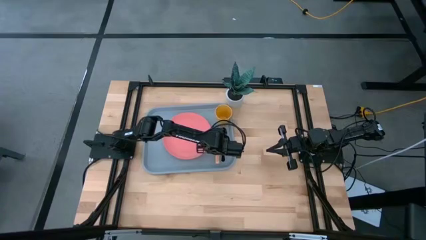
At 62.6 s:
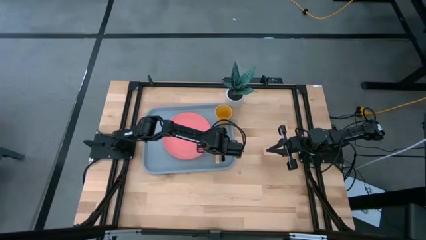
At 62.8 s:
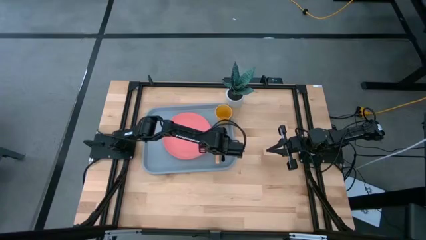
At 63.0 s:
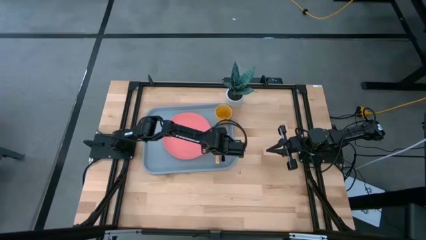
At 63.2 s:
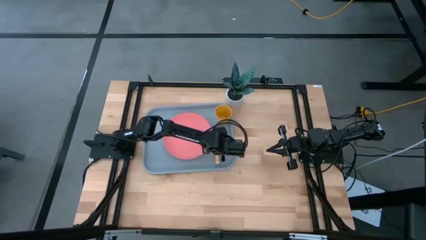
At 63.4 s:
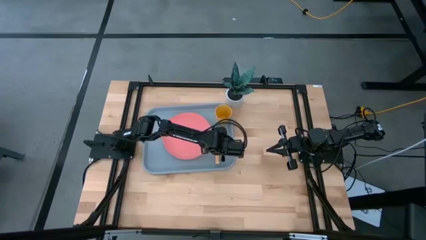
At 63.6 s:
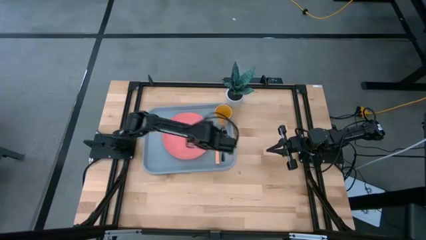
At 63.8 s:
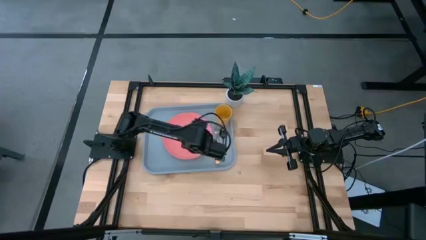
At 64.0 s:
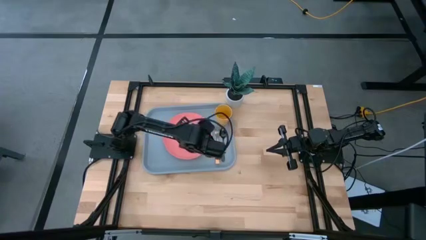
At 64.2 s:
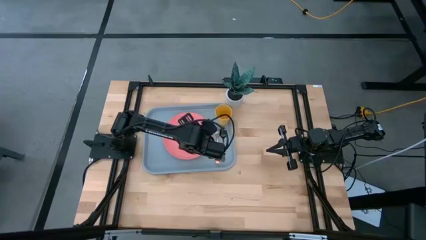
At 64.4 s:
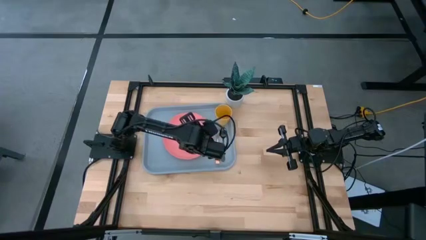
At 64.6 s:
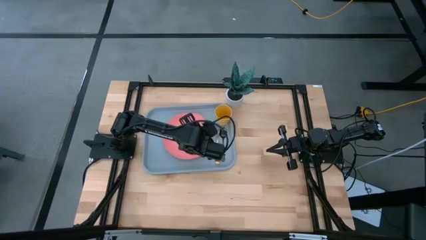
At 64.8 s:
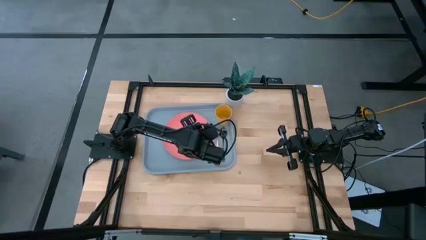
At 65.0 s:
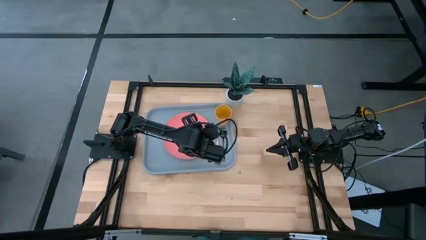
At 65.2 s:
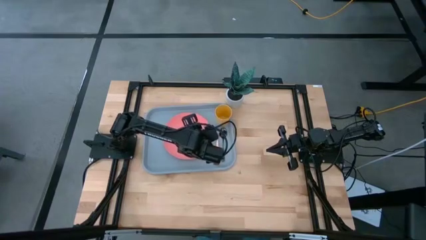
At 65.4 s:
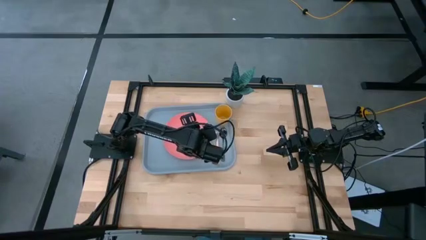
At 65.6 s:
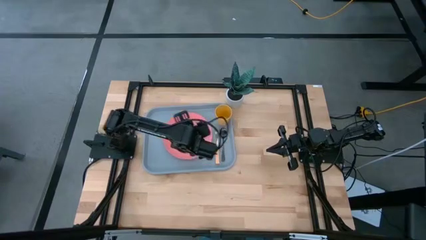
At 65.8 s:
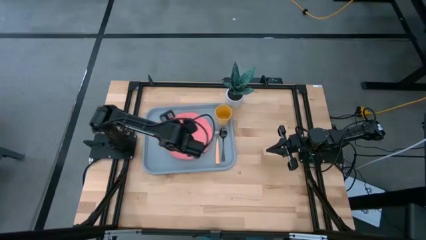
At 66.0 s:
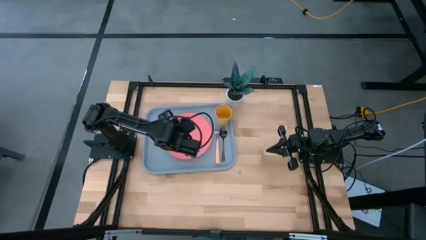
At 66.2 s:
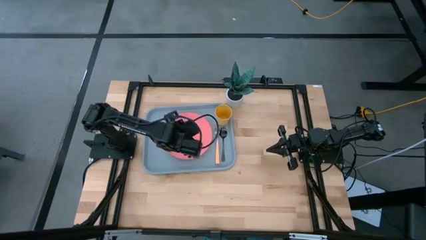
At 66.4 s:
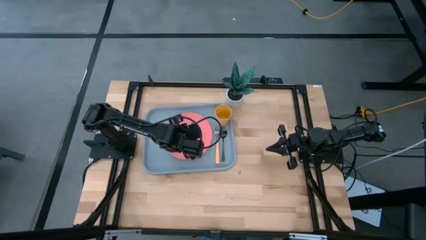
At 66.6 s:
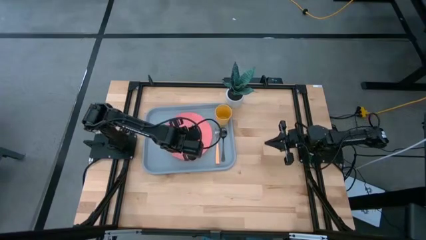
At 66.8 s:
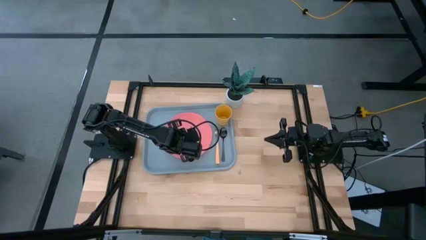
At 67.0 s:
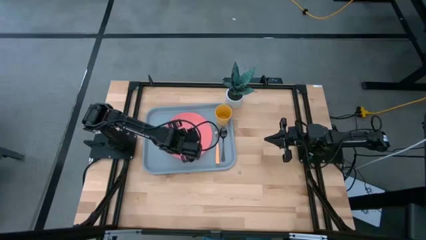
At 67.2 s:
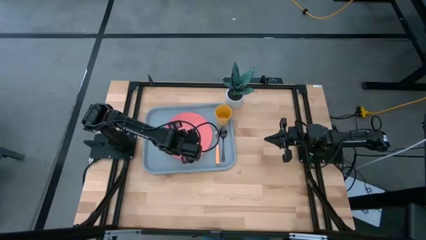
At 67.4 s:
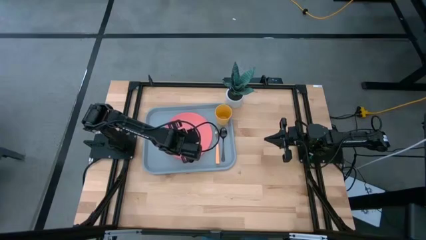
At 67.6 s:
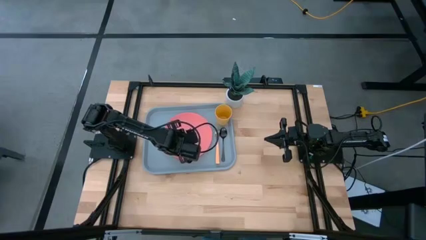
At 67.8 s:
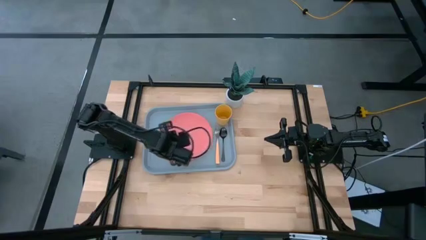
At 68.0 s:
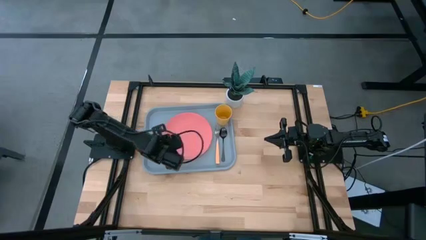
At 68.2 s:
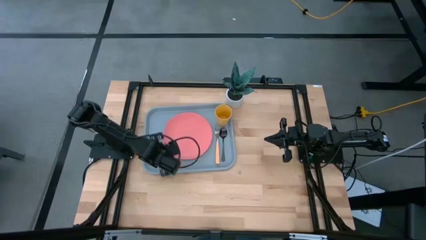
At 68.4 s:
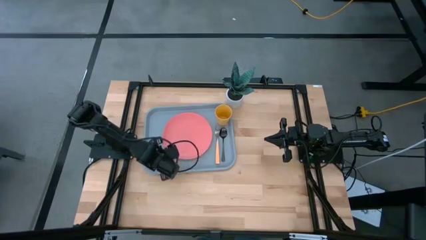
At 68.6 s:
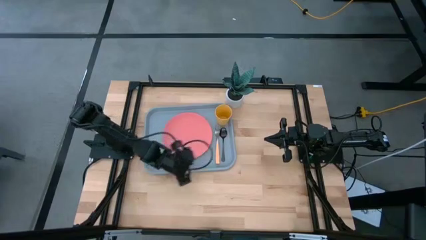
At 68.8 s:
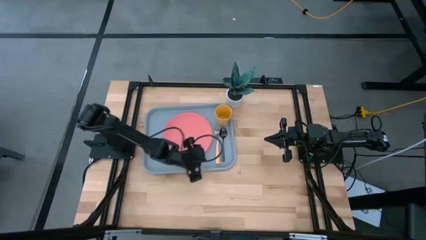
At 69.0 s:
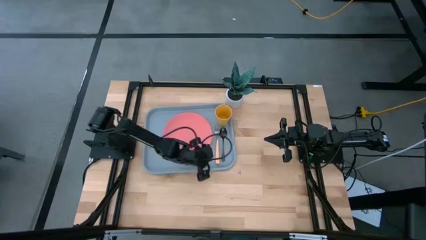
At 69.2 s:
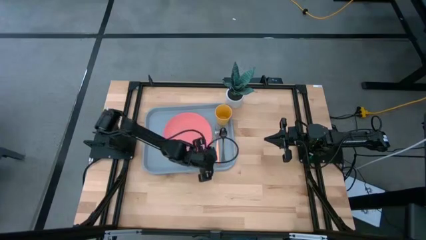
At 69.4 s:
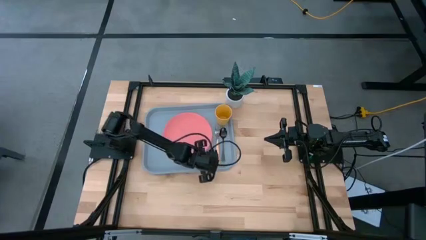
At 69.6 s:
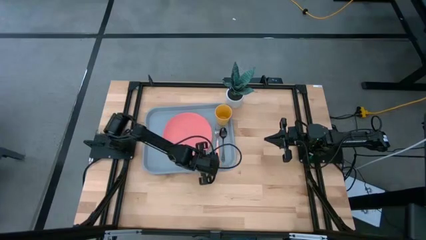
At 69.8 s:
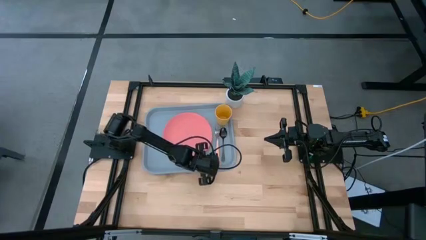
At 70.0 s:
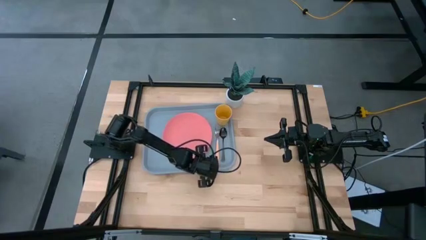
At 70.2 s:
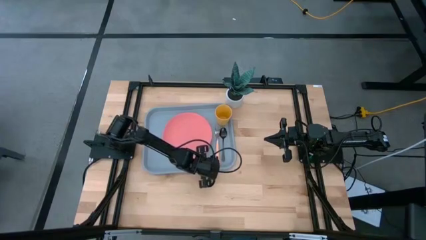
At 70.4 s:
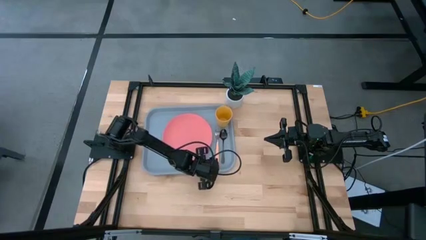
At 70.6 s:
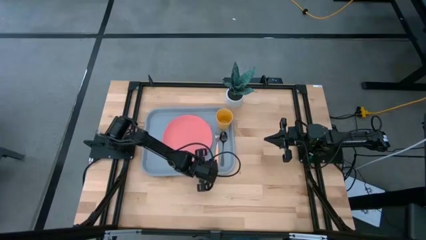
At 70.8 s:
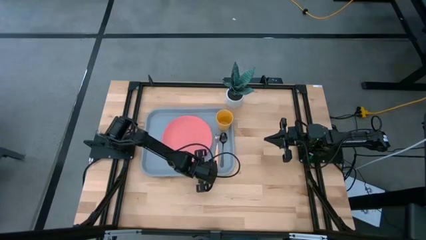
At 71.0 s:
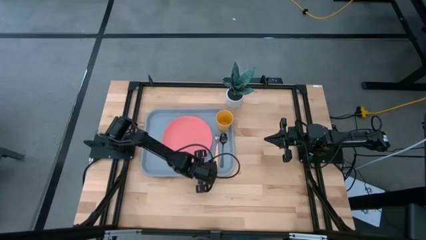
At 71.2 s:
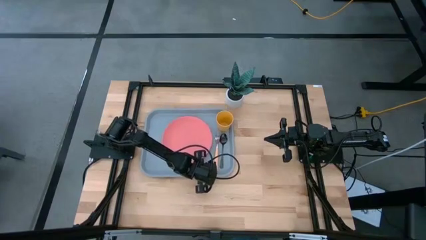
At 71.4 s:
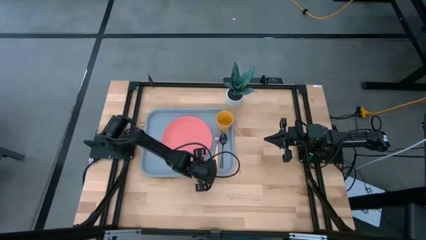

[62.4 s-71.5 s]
Task: Pick and place plate/cup/fork/spoon on tray
Adjust the gray tray

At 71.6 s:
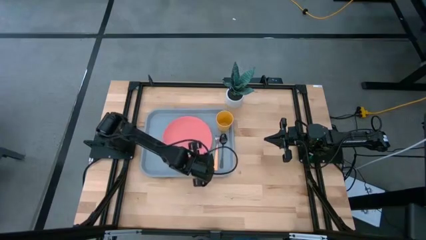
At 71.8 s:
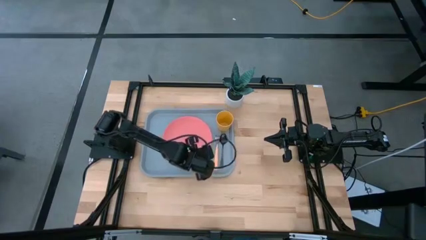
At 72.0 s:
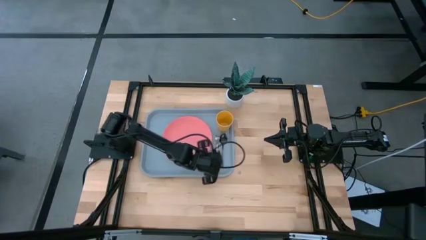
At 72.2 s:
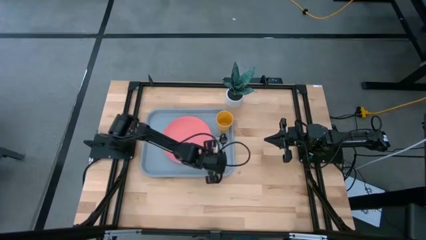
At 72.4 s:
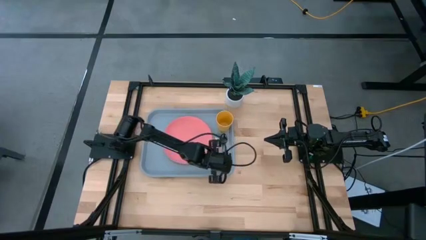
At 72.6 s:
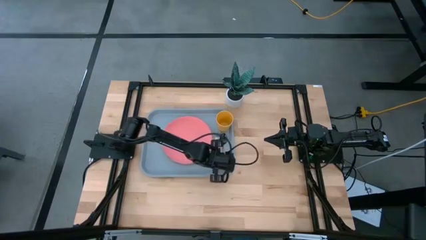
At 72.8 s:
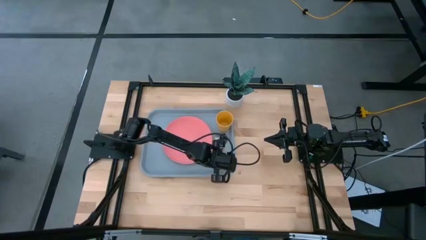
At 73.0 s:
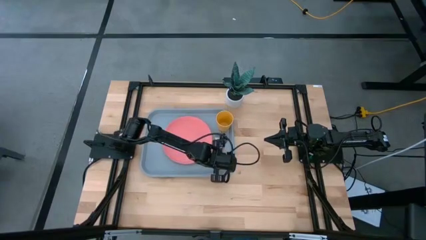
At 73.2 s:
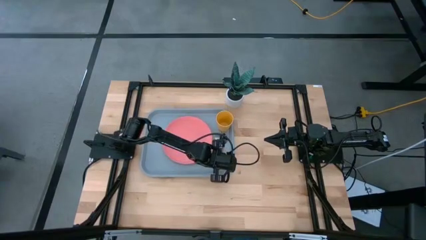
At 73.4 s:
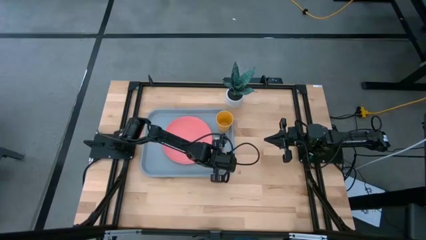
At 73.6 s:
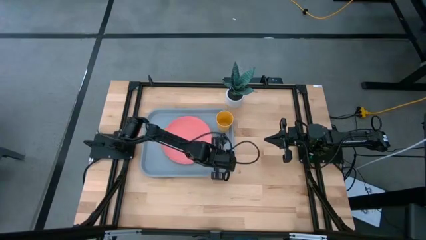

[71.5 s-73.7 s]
Adjust the black spoon

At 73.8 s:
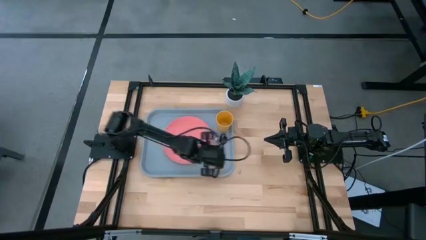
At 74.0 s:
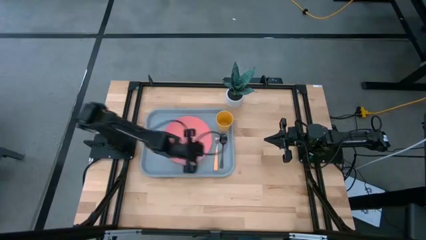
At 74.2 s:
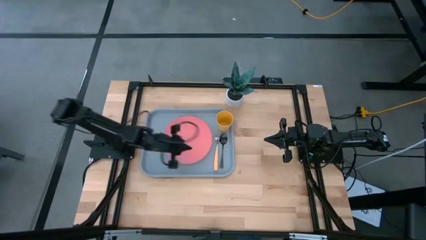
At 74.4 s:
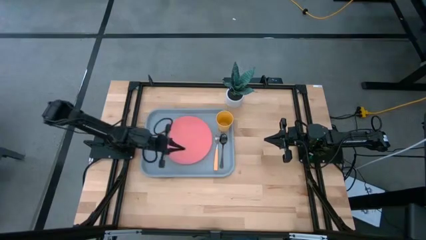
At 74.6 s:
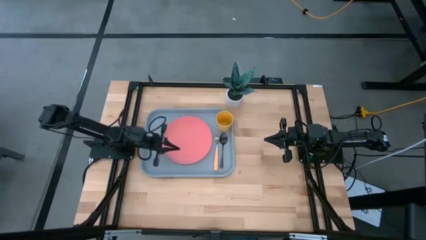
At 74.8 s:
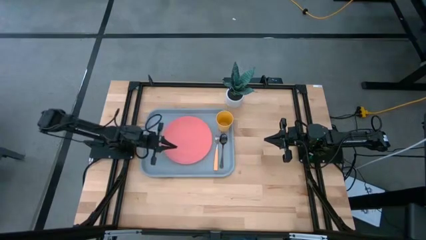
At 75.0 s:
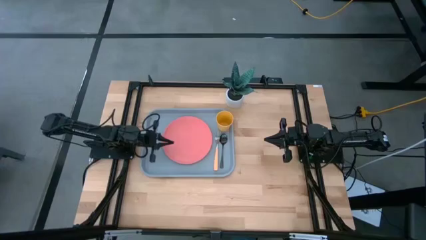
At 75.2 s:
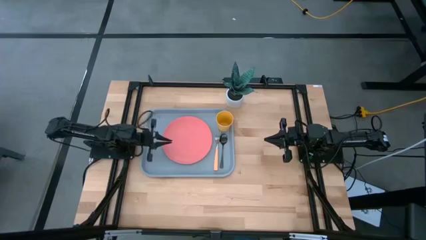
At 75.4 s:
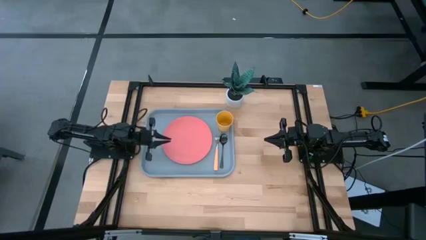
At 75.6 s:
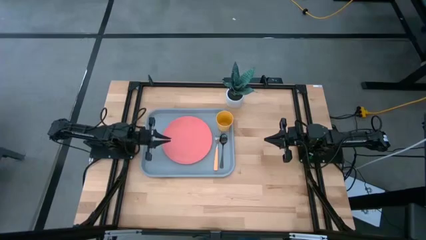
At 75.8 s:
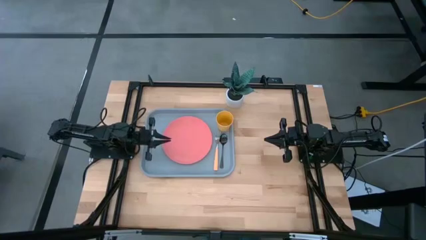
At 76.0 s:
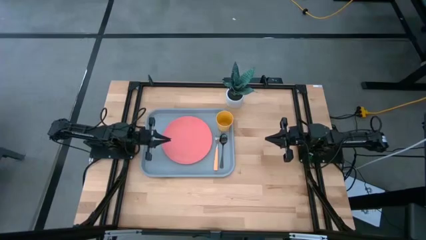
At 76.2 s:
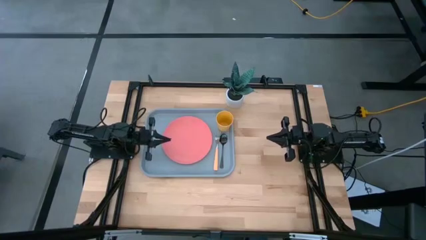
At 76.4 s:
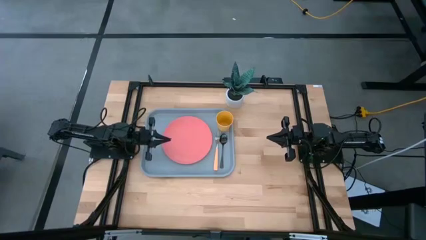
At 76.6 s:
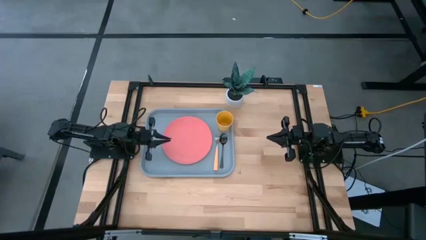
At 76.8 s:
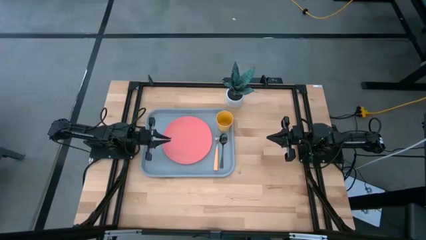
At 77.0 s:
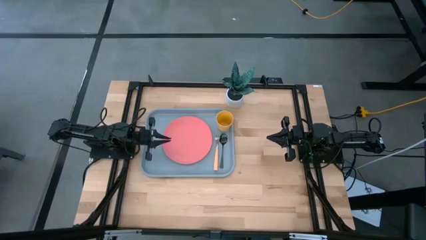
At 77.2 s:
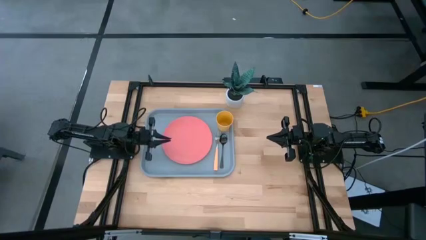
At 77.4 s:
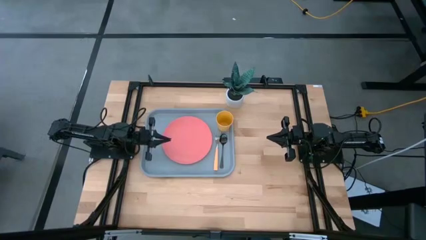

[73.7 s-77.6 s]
Return to Home Position
